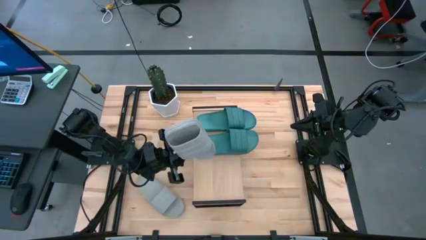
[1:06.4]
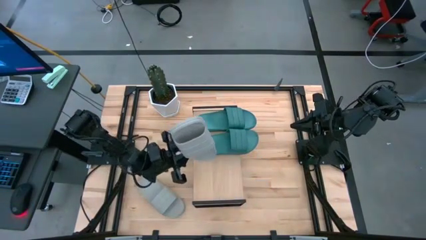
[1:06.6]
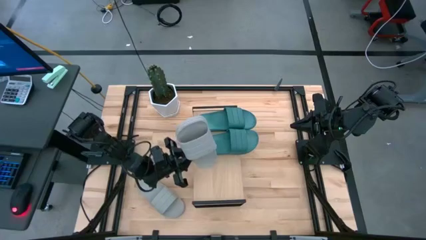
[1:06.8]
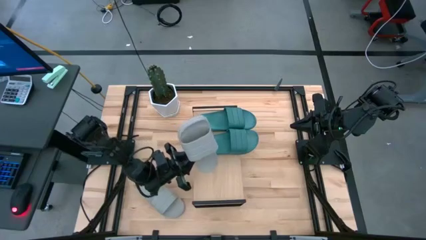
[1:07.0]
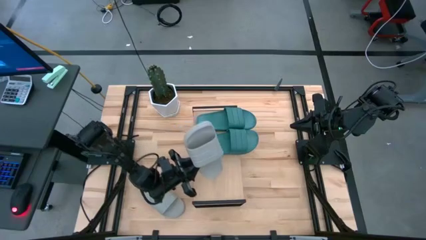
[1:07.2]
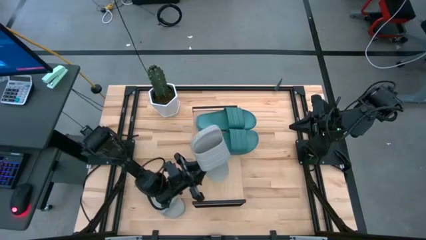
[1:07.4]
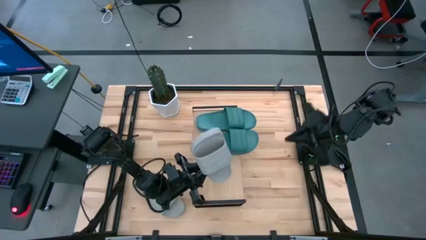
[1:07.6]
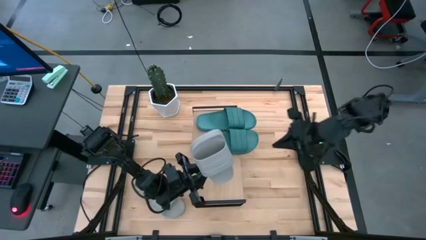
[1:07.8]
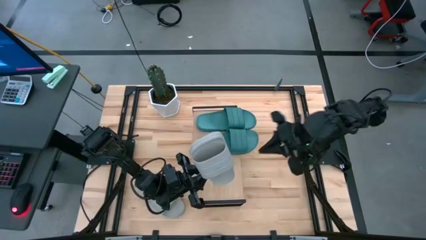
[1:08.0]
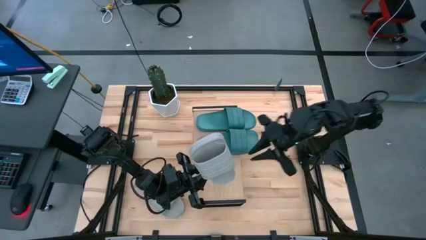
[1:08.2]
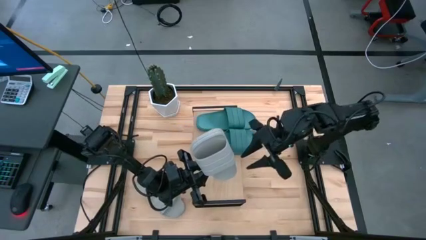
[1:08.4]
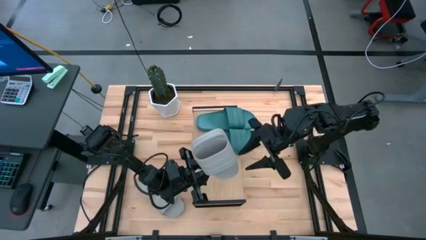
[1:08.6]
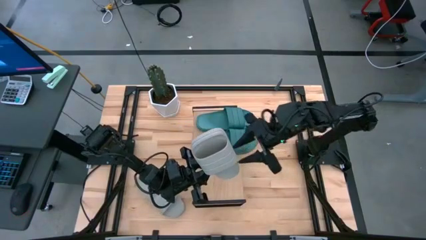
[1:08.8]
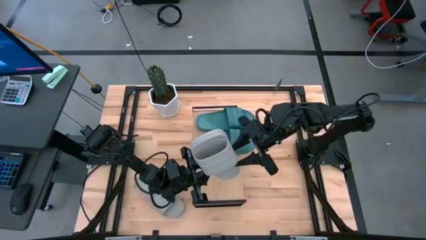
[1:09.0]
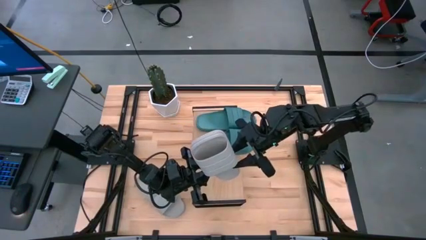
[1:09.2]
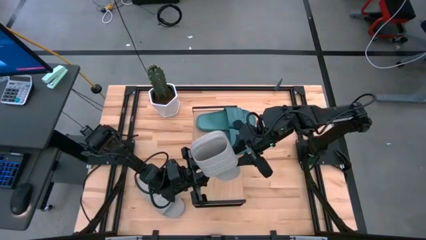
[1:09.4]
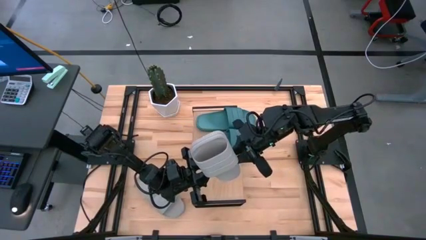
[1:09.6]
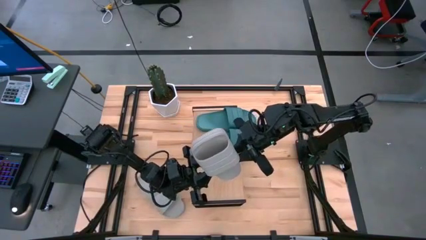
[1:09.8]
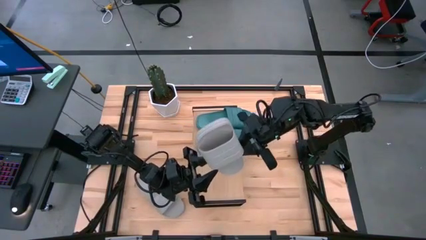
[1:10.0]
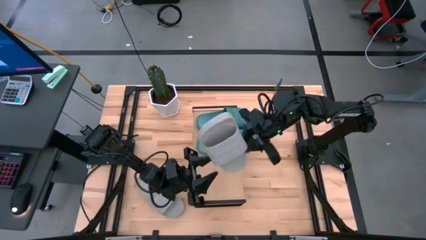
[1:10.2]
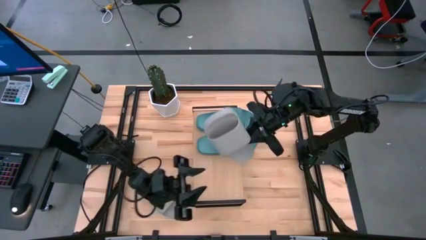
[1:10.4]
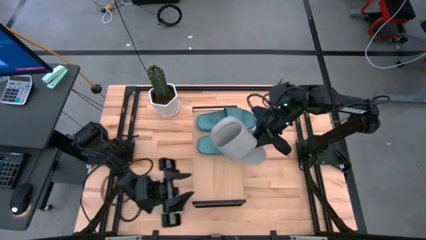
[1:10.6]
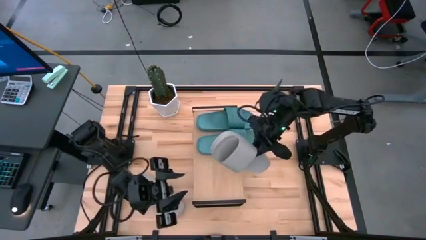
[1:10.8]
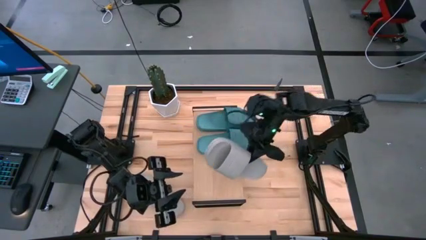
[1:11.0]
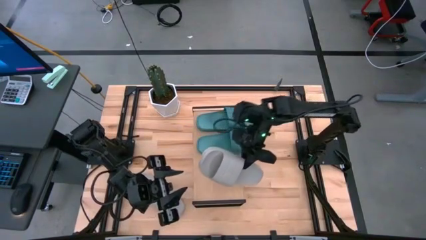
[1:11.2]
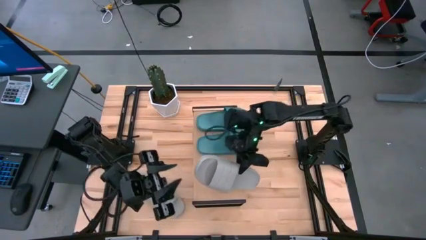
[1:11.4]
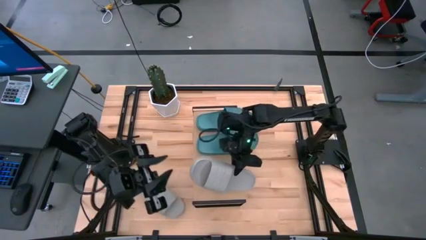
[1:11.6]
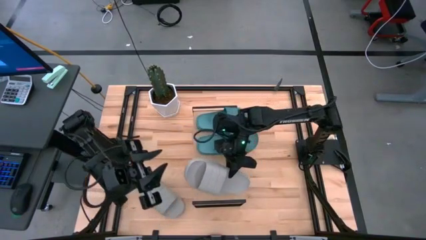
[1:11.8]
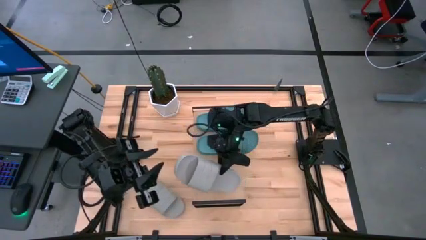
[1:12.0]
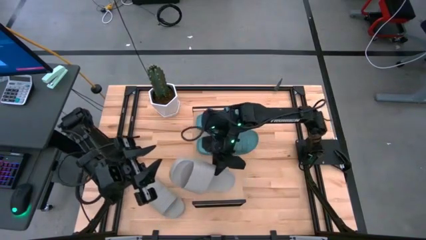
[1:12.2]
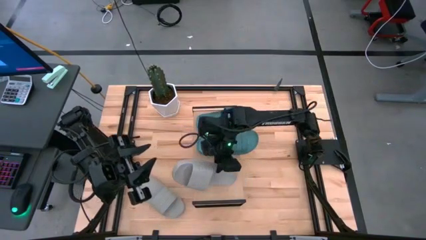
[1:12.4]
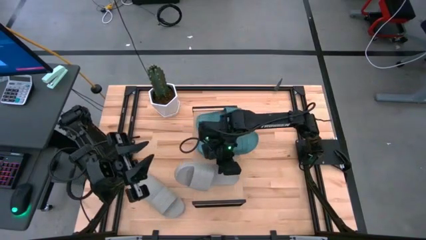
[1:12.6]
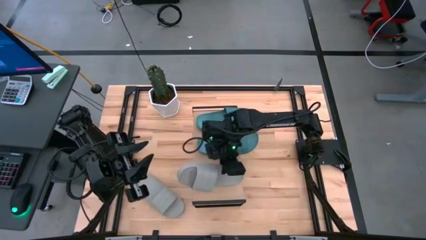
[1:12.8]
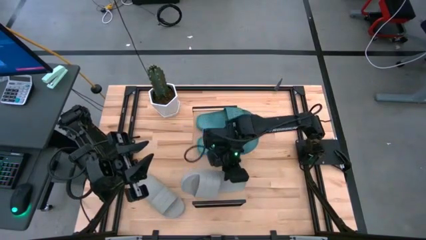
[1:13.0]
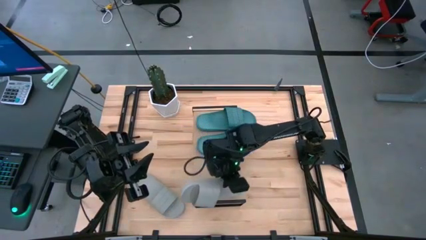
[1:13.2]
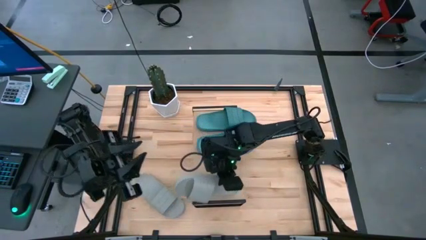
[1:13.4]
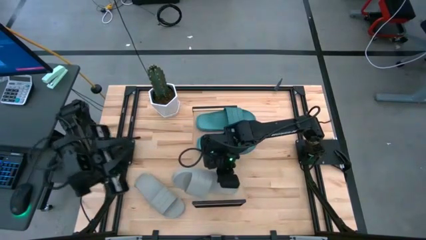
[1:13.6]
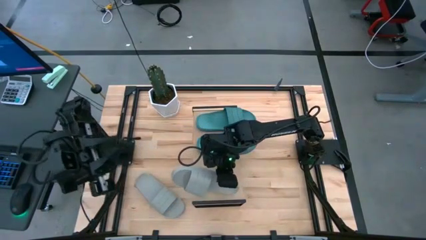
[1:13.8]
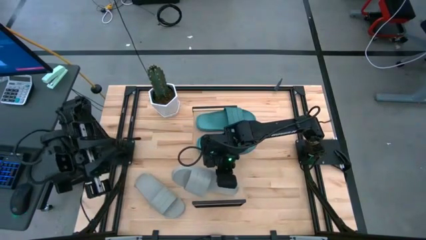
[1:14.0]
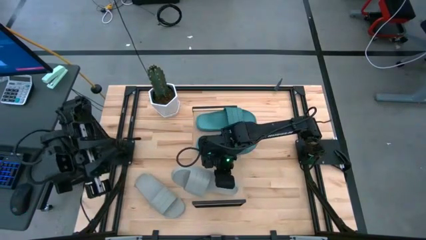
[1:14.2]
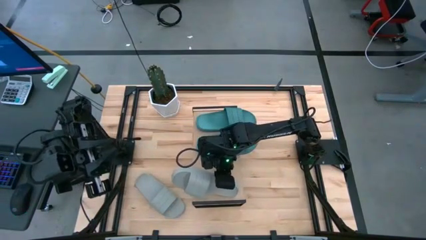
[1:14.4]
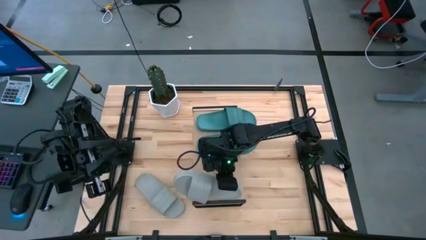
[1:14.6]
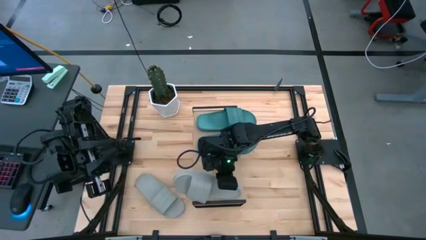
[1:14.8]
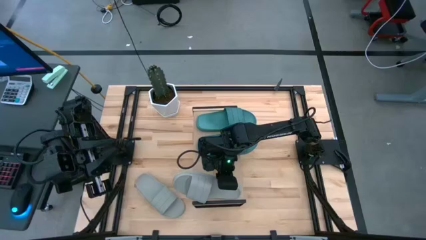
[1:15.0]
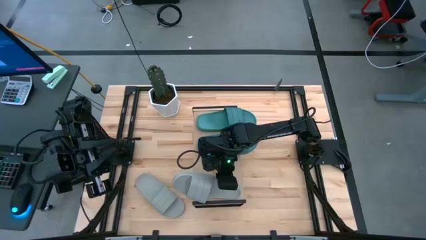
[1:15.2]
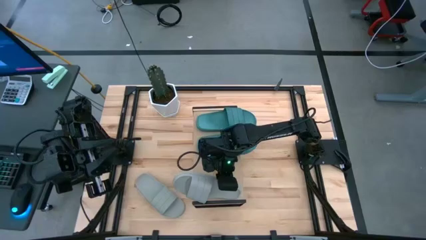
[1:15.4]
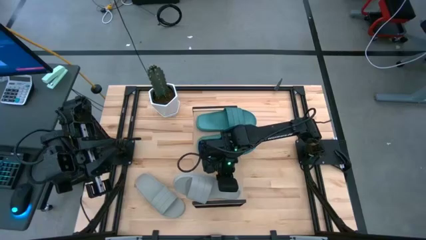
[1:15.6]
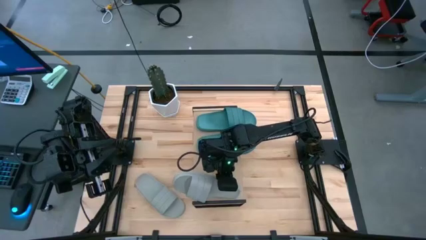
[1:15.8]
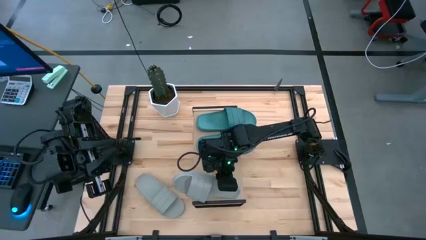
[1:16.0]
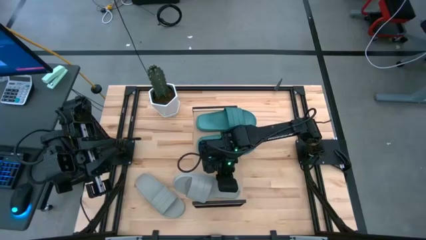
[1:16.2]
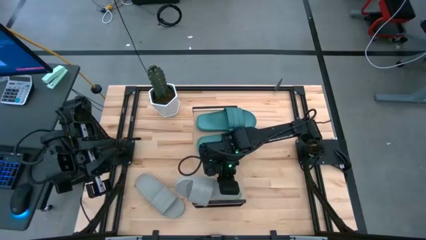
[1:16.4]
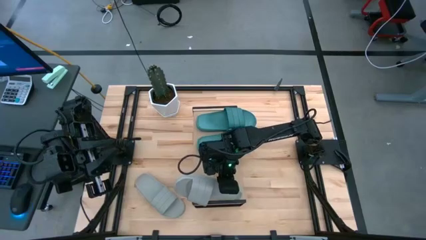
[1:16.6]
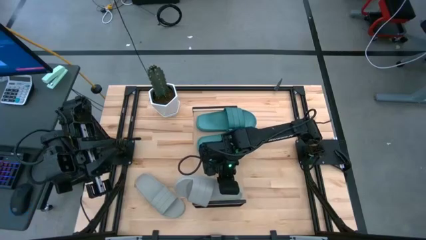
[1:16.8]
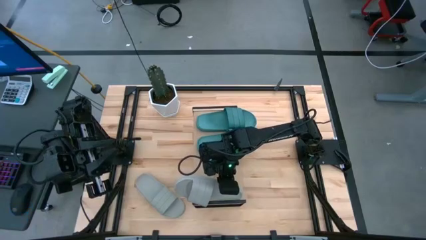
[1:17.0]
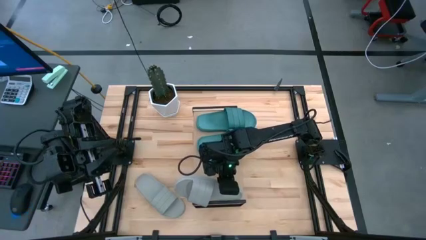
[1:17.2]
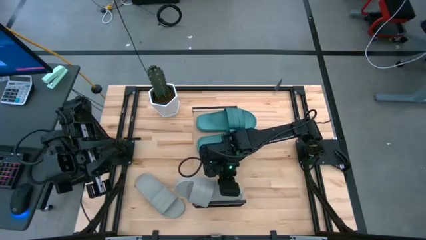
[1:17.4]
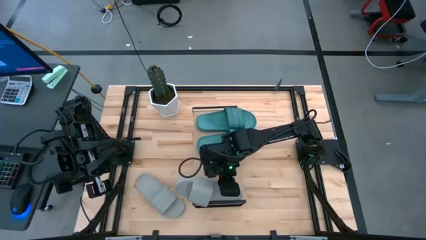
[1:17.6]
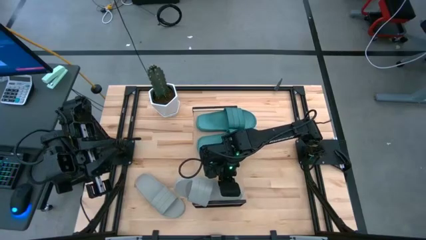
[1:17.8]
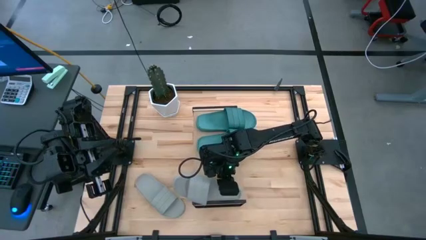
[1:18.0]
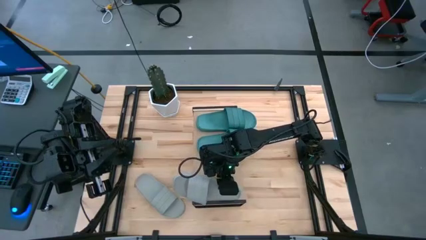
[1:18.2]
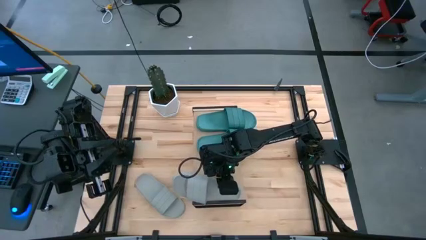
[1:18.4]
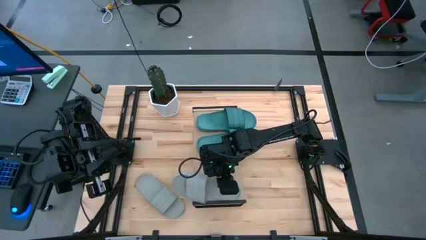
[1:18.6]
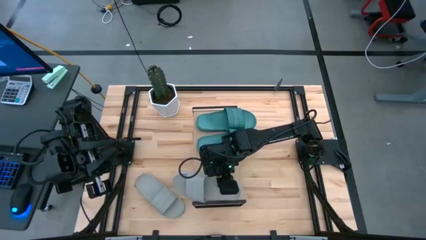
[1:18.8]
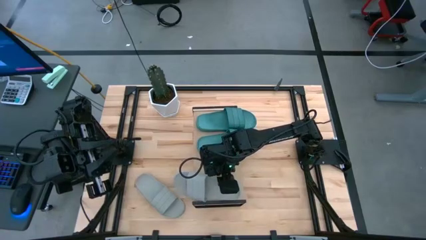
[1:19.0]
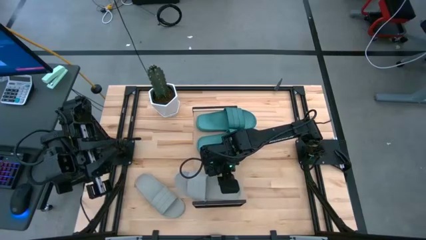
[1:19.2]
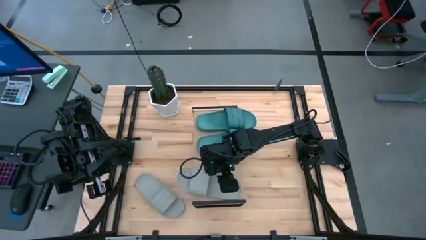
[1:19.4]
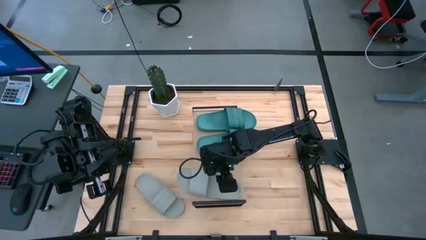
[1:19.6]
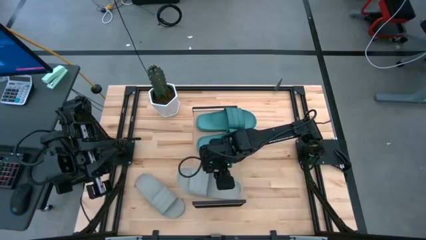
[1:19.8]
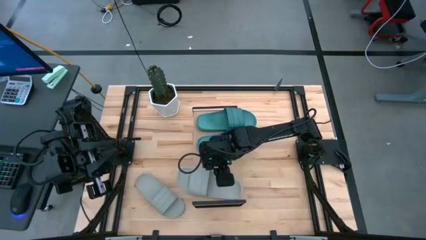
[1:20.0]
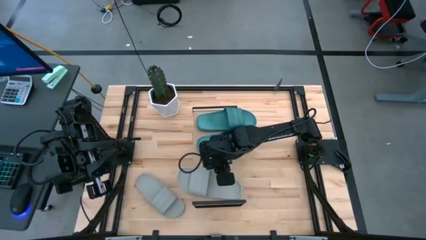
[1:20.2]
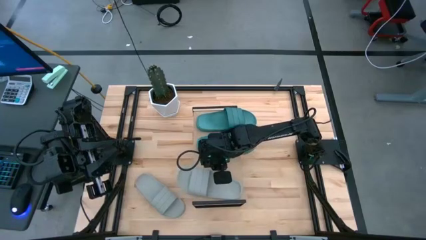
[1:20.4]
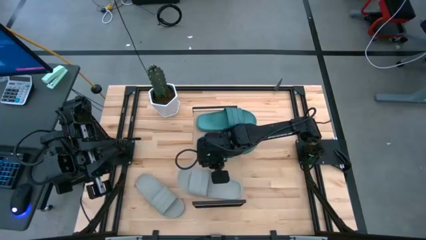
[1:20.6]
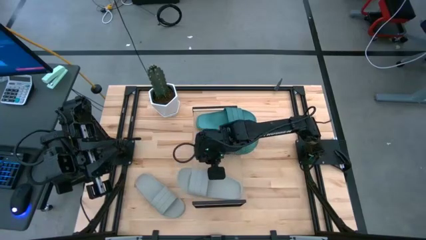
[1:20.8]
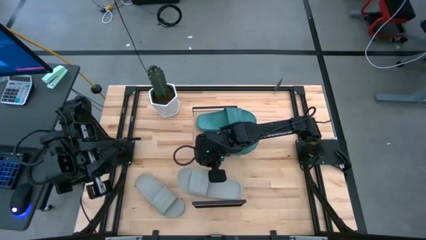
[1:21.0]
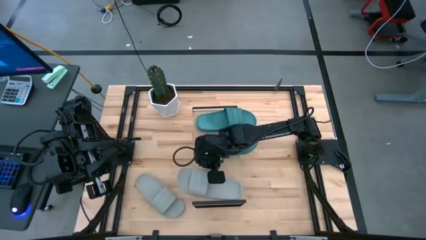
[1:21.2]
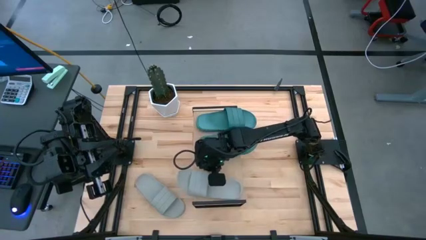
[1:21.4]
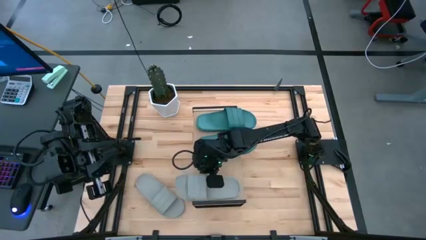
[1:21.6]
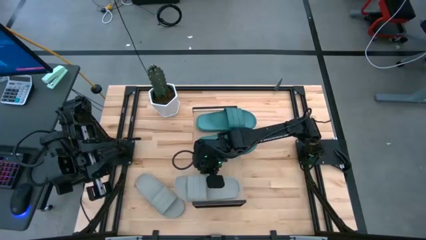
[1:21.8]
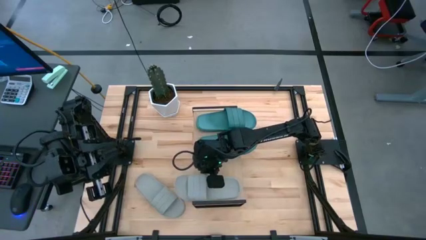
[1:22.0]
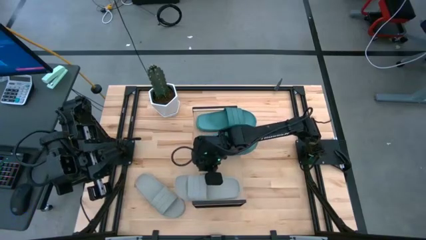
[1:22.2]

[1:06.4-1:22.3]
Task: Pick and place slides into the shelf
Put the right gray slide on the shelf
